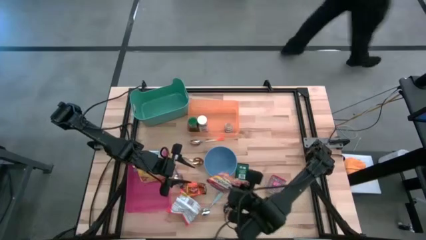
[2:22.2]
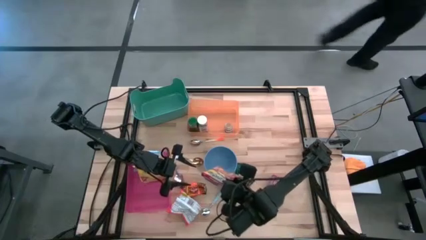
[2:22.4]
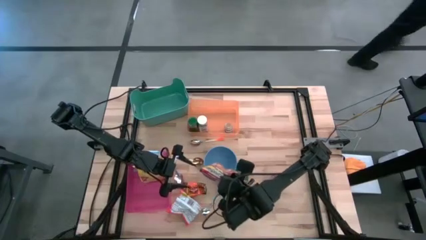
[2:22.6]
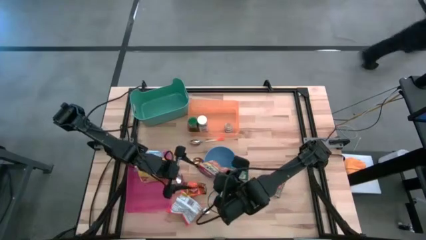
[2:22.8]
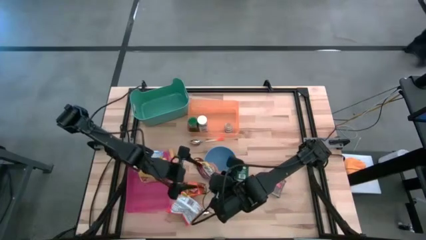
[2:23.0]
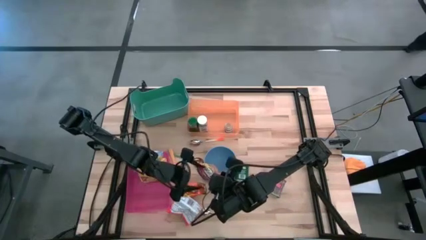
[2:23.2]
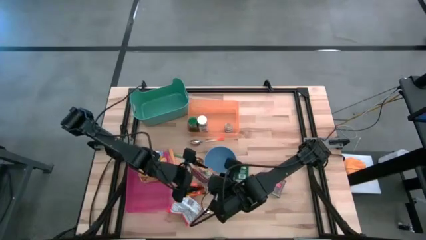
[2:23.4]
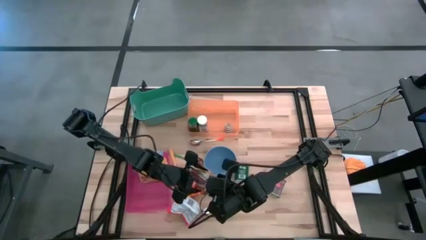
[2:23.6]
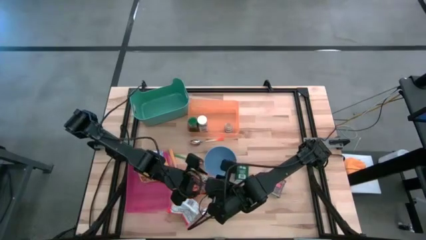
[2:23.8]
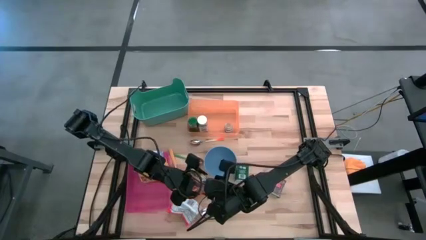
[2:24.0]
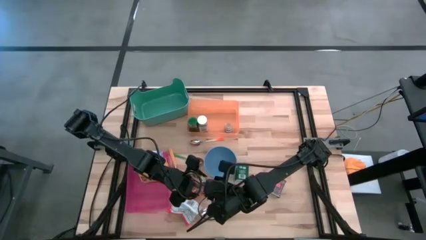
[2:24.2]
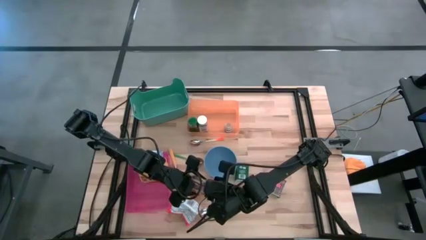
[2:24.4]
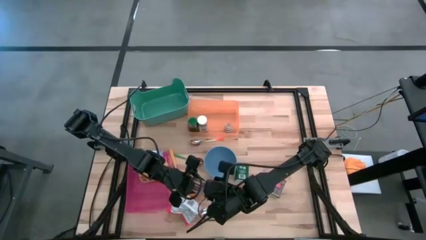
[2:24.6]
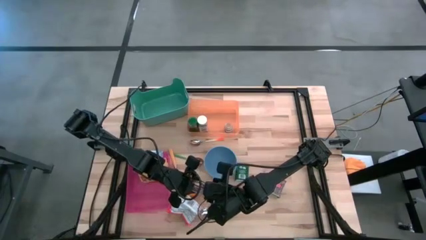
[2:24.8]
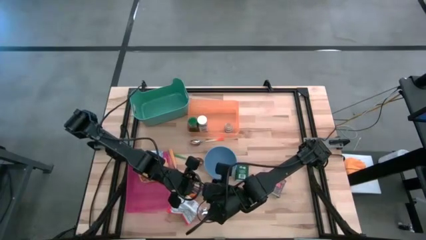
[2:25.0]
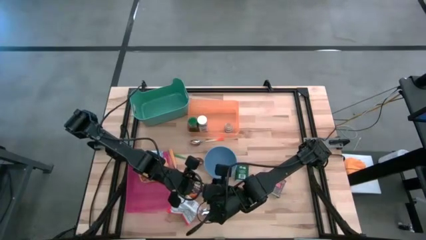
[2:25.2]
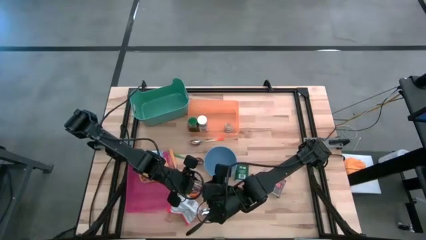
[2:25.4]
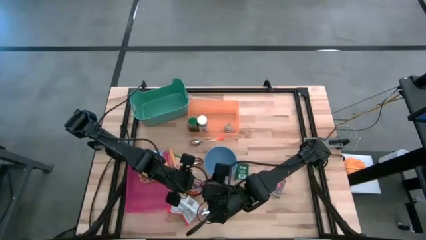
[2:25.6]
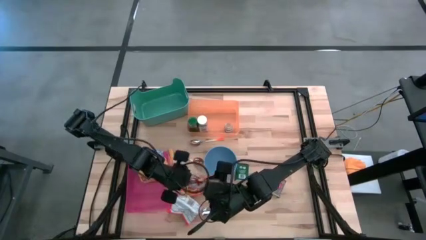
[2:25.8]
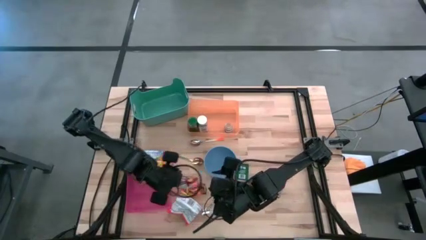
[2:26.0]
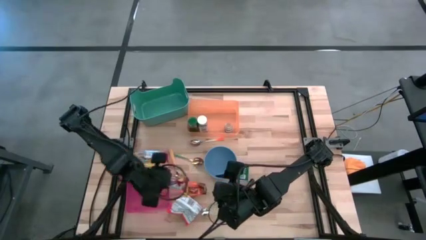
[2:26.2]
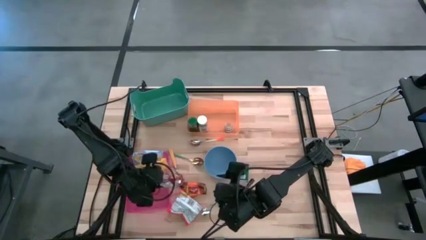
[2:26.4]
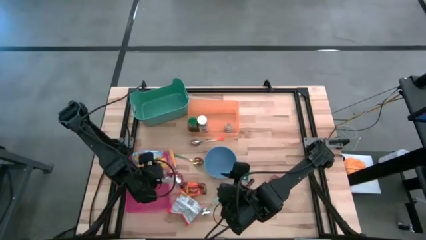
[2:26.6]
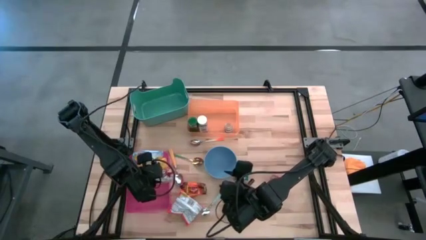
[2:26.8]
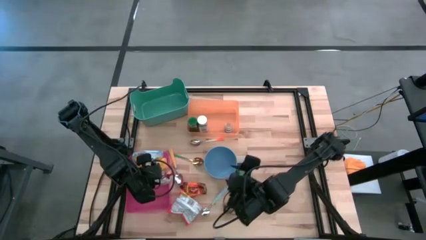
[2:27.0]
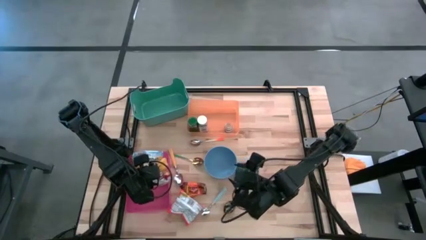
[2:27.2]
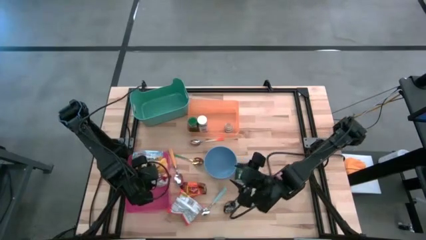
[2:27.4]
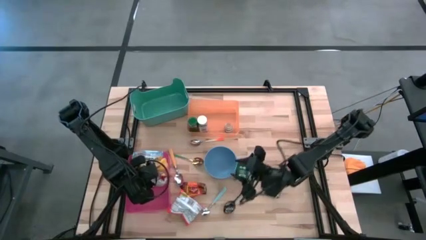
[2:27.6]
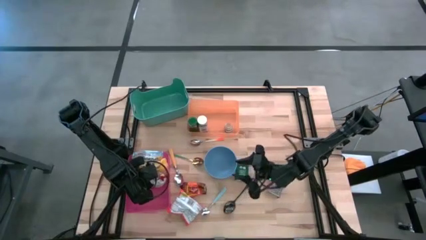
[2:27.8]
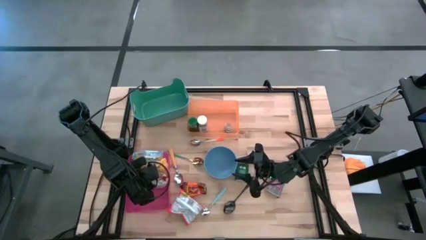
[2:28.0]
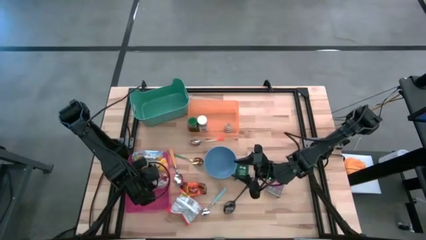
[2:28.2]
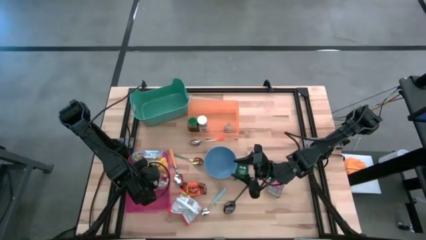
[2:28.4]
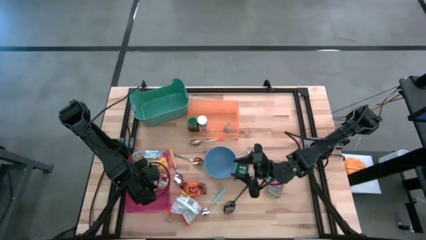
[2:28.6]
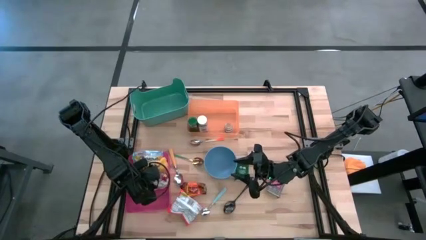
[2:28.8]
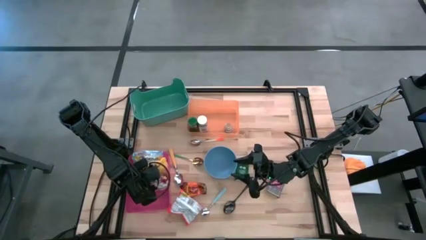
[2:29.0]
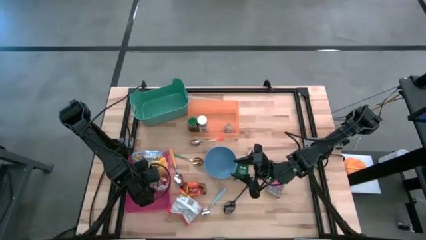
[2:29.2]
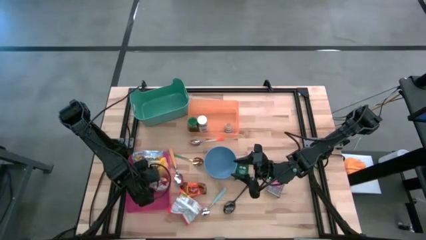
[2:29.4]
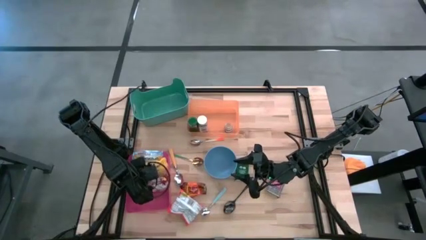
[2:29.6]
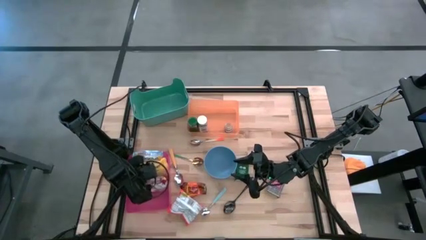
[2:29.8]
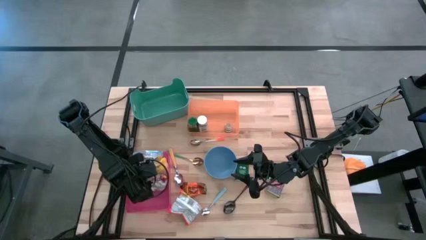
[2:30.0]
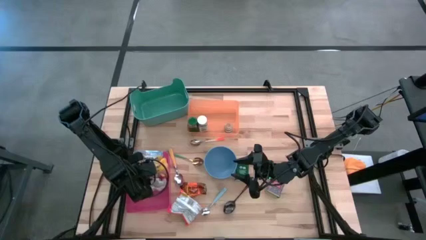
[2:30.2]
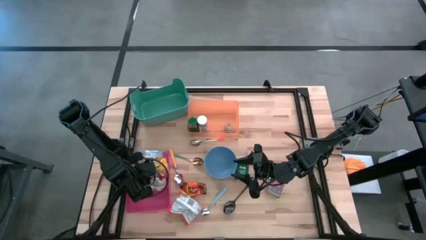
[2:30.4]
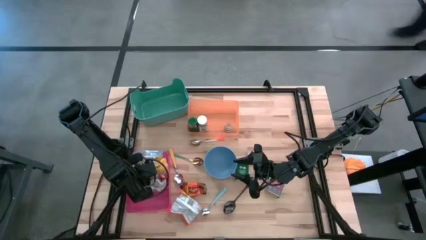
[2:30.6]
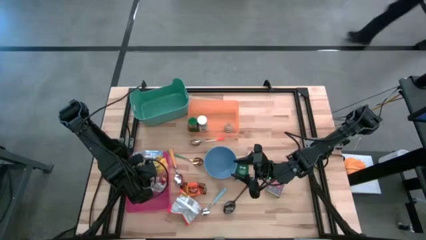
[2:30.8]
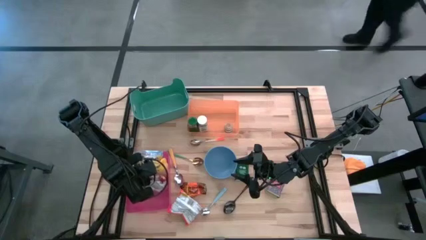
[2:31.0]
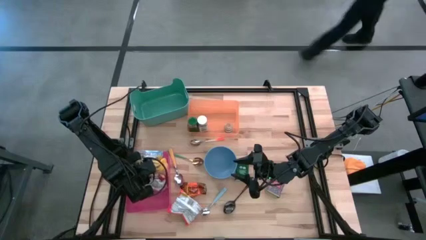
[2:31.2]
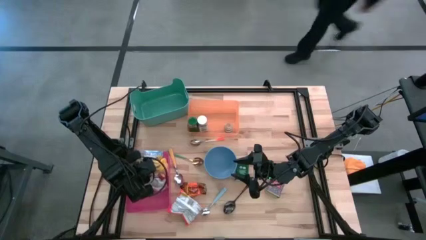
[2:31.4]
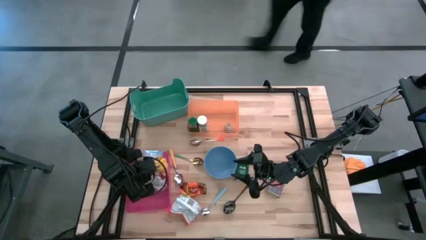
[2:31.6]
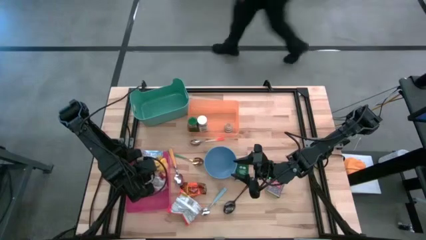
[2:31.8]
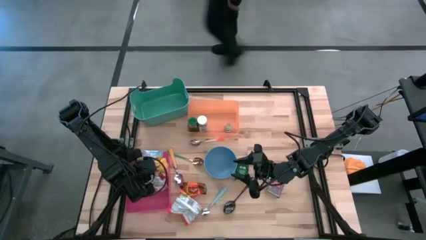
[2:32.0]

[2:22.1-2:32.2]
Put the red noodle pack into the pink bin

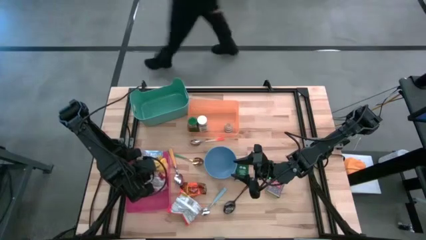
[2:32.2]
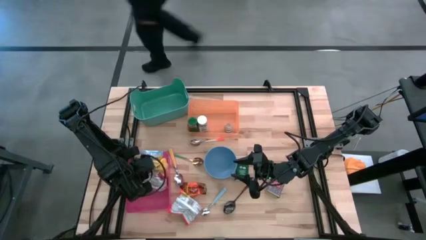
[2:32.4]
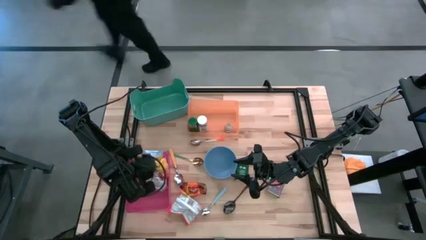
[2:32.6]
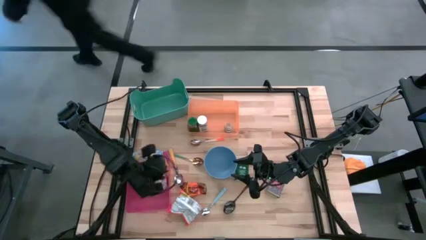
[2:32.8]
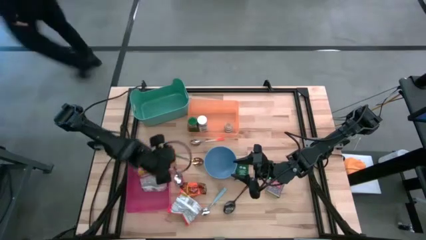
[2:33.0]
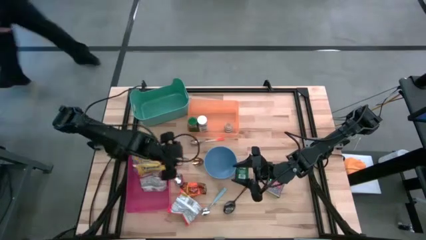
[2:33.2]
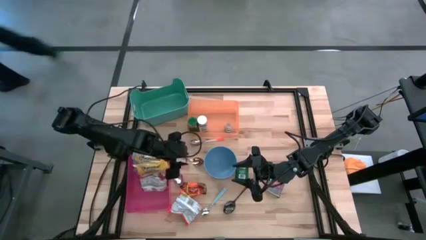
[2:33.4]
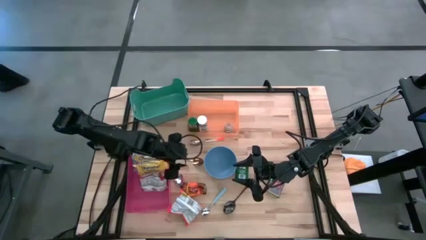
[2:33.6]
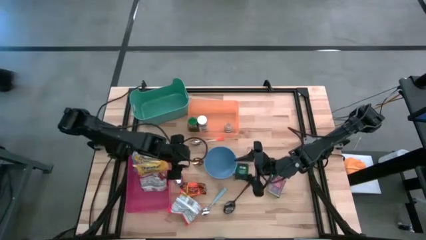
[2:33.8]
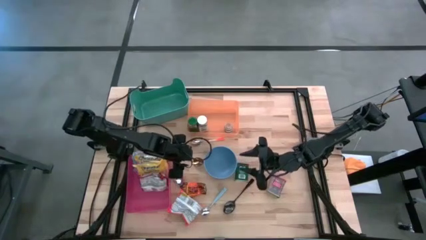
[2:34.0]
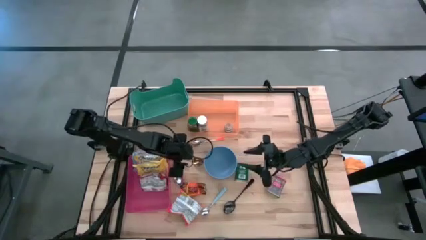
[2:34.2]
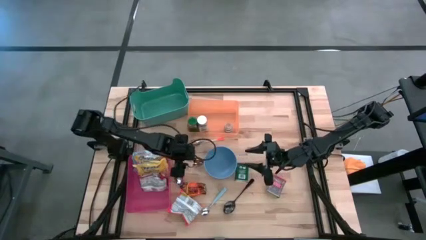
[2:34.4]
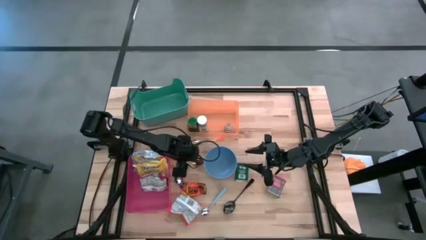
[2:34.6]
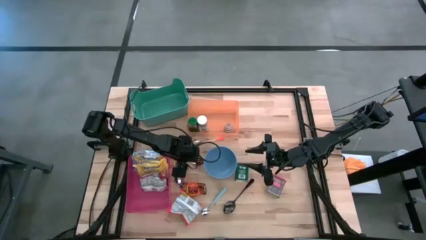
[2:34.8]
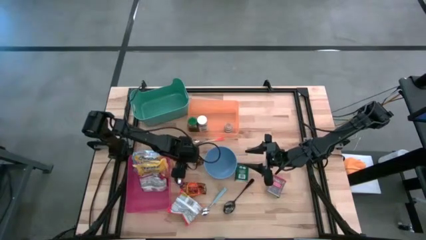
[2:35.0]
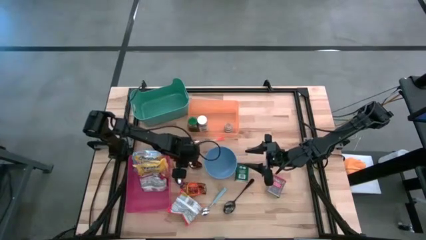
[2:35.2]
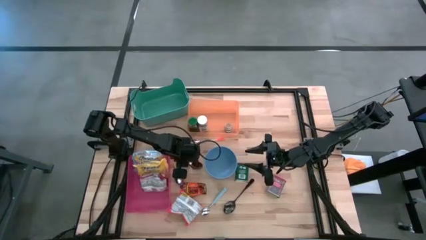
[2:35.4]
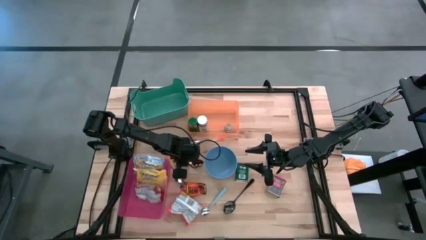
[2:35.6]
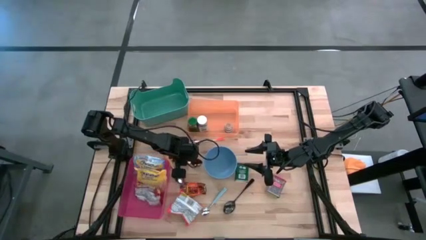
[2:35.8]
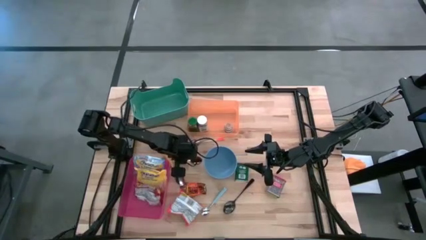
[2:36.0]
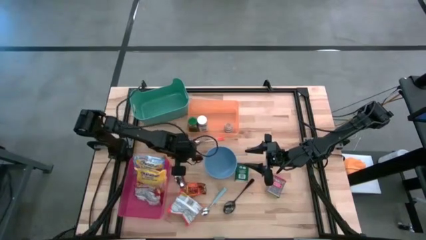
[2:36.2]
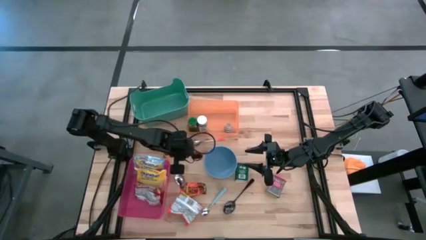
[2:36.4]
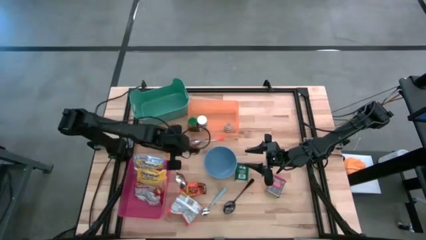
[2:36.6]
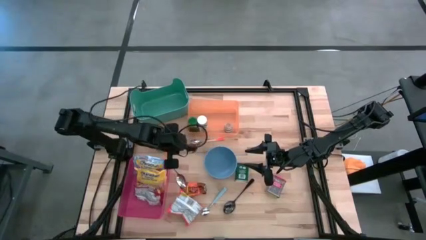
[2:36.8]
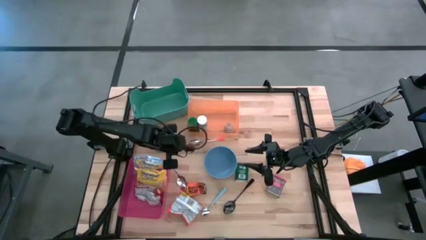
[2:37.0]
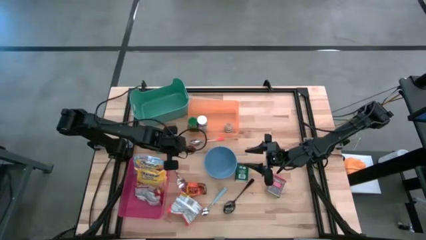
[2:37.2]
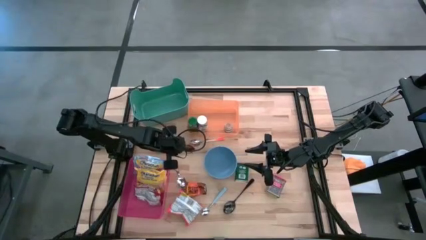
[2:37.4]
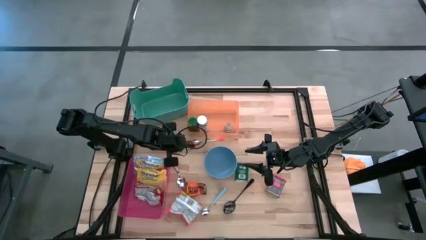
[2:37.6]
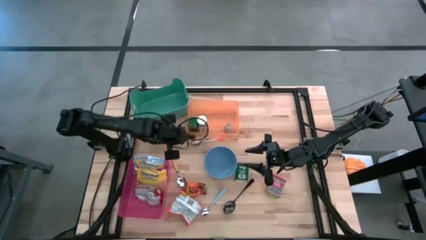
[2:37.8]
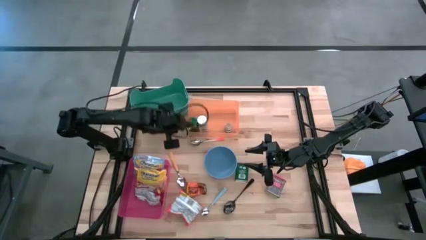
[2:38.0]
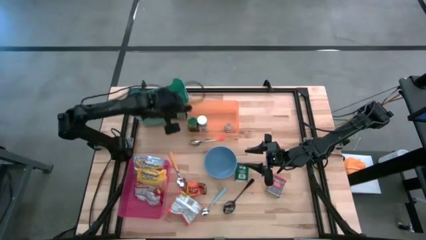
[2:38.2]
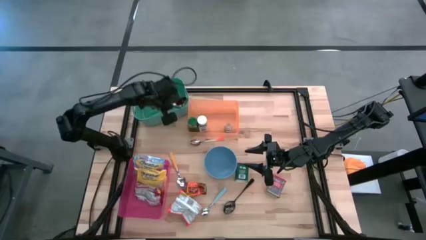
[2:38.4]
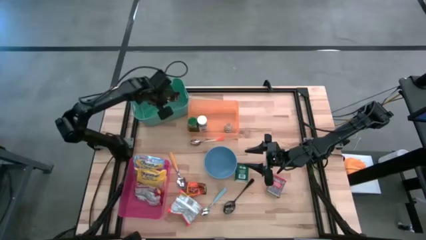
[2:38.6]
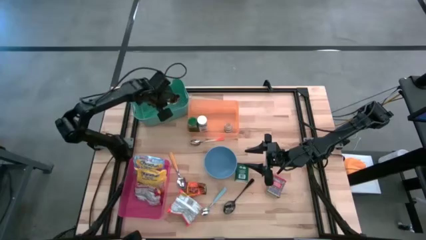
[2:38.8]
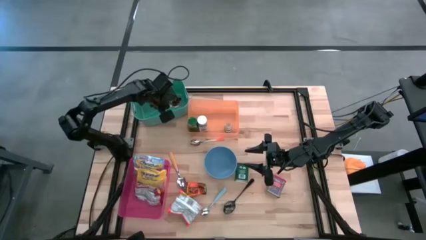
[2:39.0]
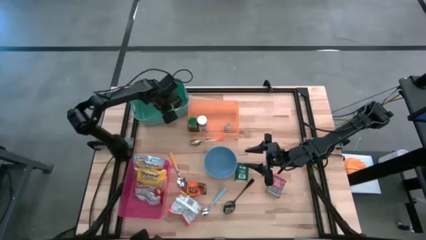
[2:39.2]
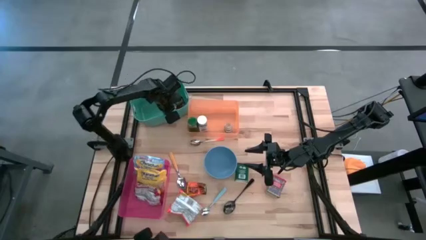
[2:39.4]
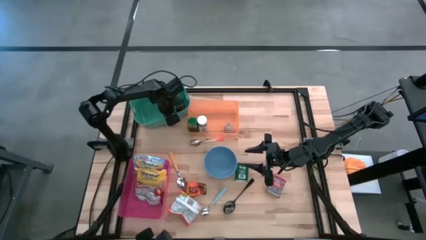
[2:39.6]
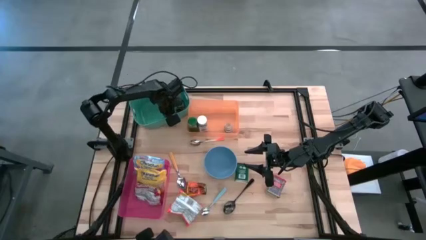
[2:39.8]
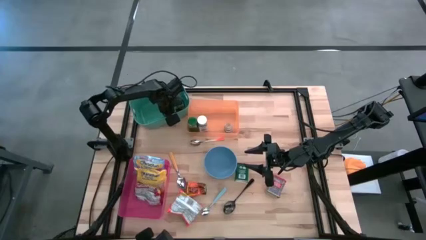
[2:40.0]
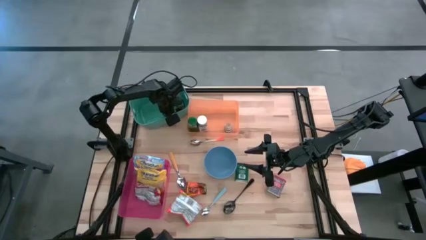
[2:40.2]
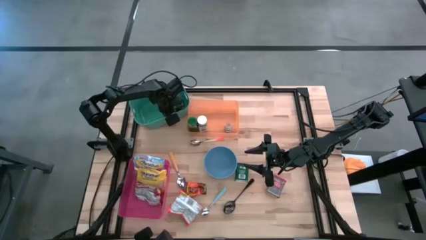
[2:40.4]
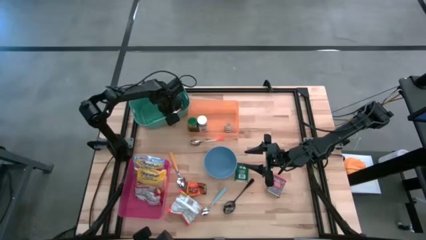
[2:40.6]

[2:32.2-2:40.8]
Put the green spoon into the green bin
